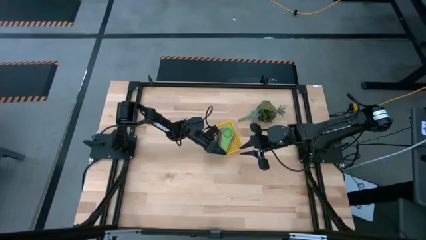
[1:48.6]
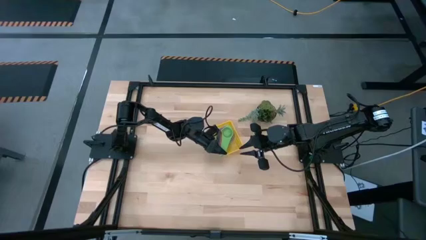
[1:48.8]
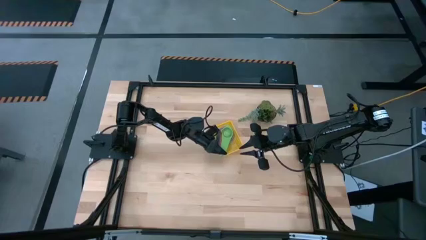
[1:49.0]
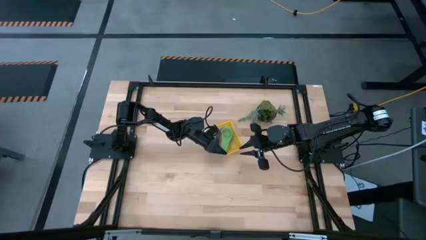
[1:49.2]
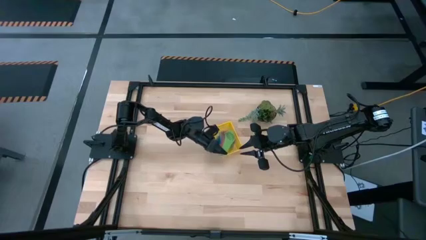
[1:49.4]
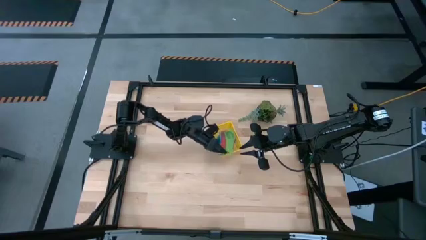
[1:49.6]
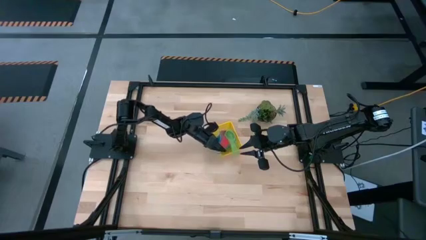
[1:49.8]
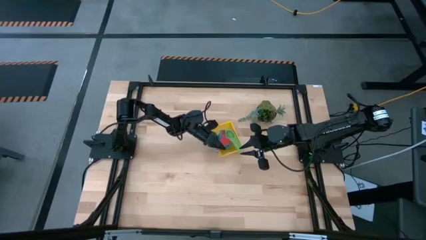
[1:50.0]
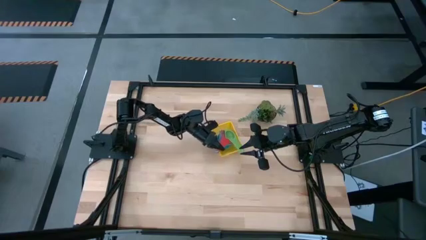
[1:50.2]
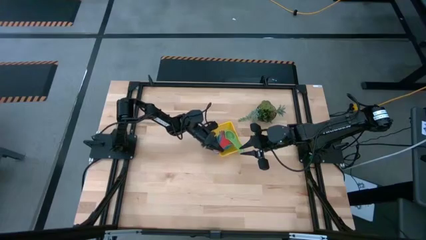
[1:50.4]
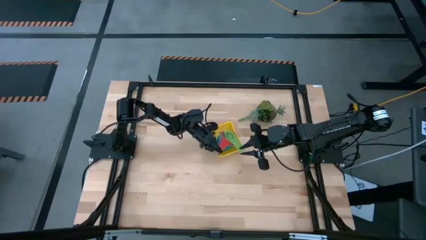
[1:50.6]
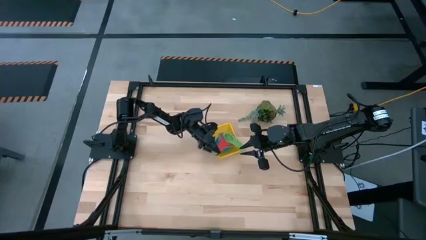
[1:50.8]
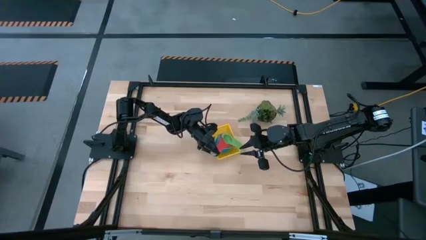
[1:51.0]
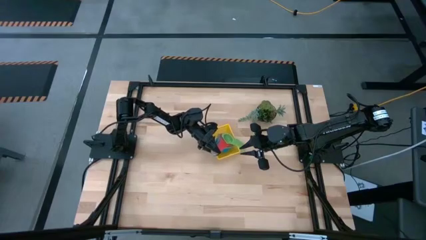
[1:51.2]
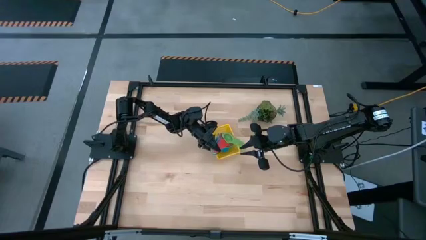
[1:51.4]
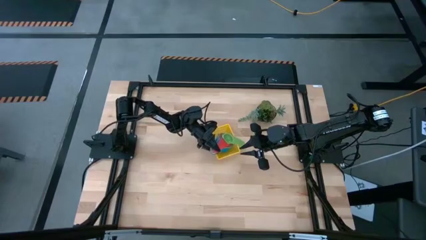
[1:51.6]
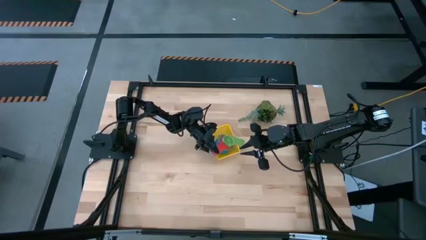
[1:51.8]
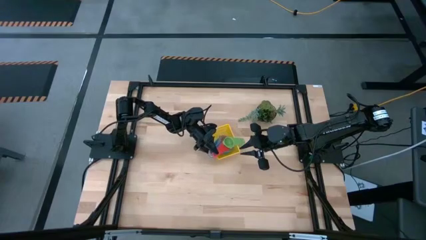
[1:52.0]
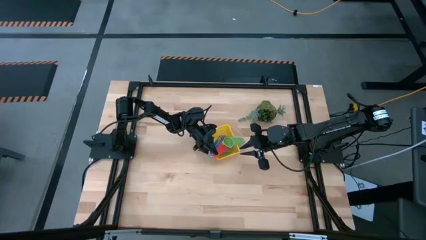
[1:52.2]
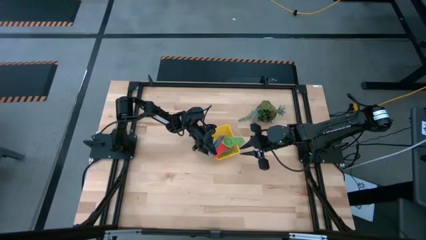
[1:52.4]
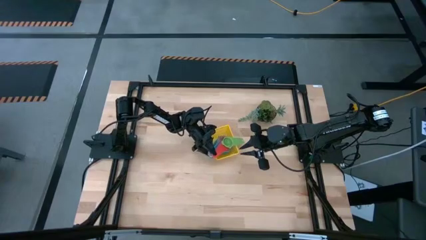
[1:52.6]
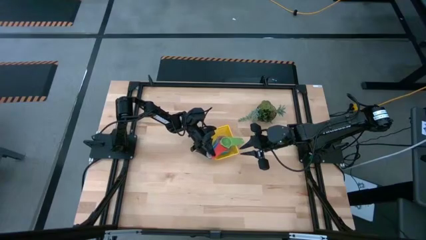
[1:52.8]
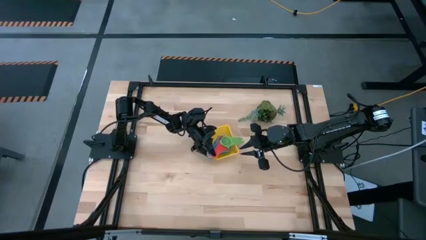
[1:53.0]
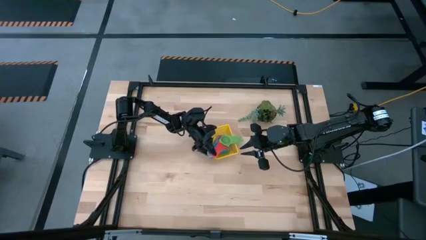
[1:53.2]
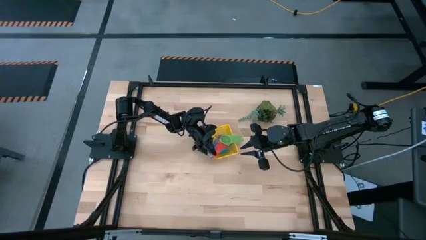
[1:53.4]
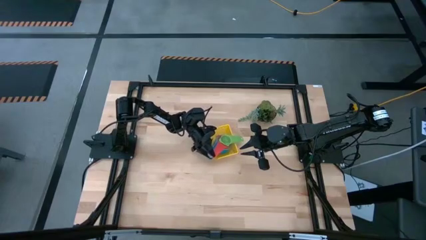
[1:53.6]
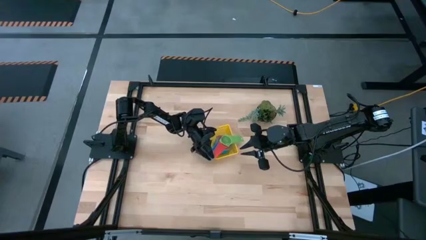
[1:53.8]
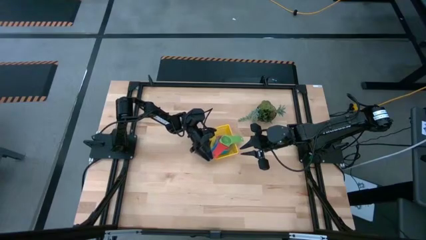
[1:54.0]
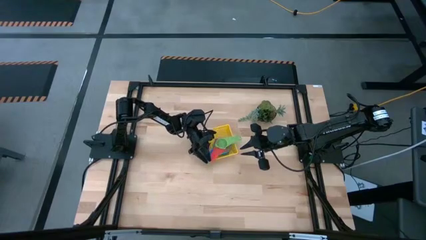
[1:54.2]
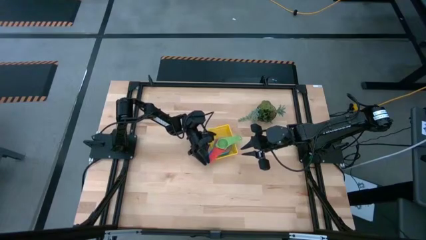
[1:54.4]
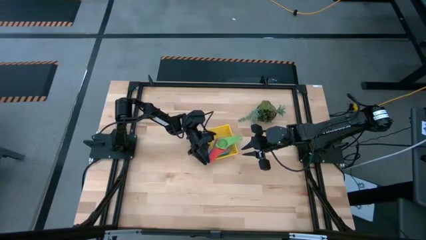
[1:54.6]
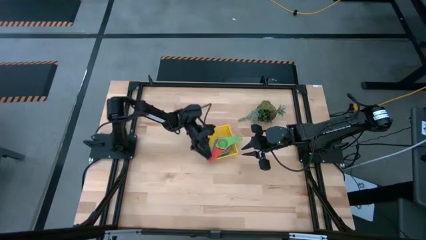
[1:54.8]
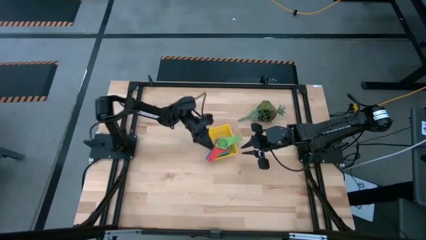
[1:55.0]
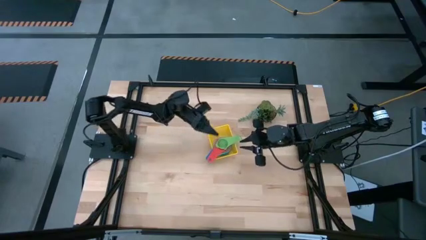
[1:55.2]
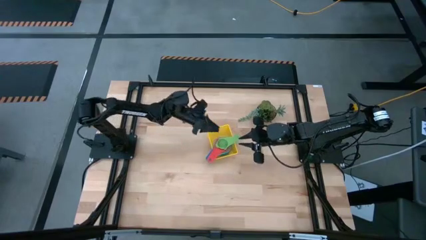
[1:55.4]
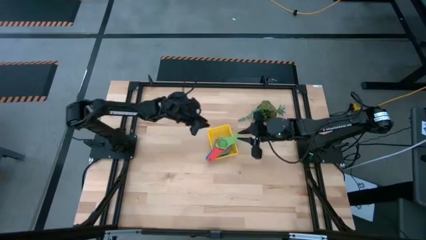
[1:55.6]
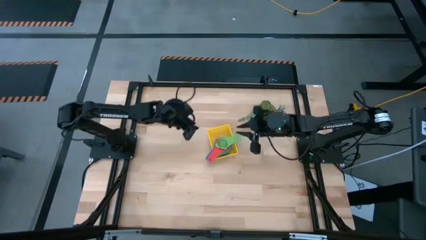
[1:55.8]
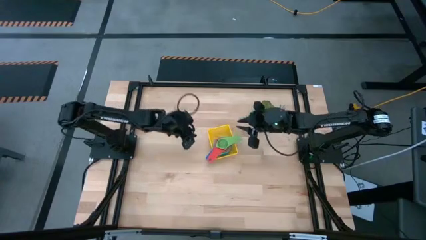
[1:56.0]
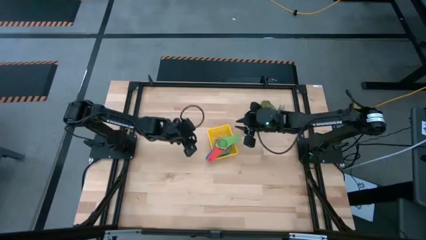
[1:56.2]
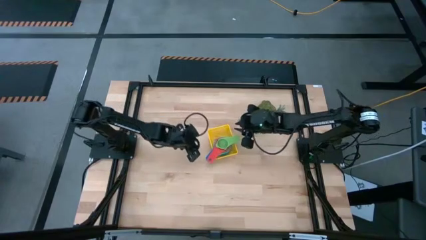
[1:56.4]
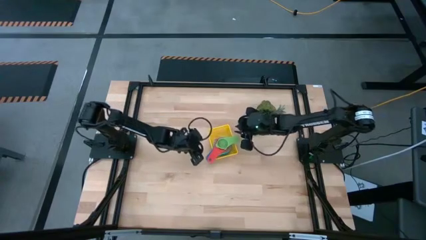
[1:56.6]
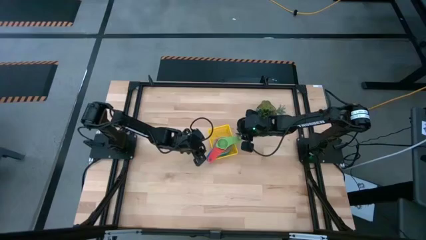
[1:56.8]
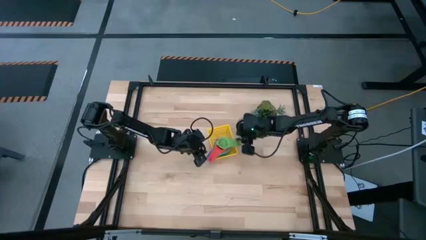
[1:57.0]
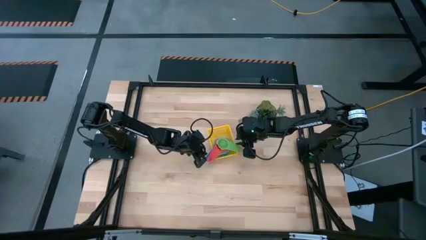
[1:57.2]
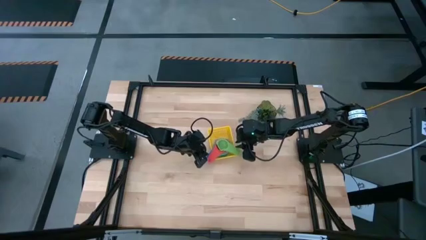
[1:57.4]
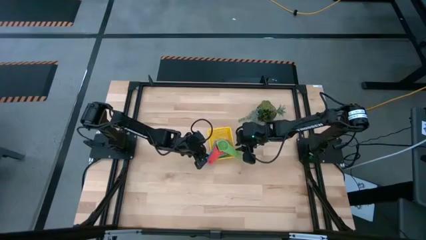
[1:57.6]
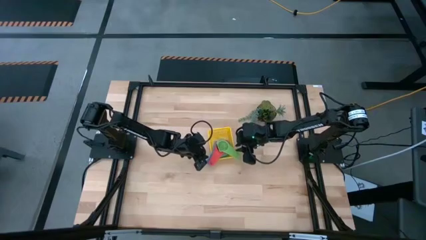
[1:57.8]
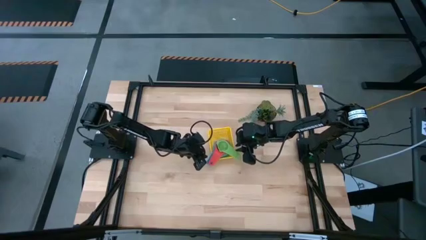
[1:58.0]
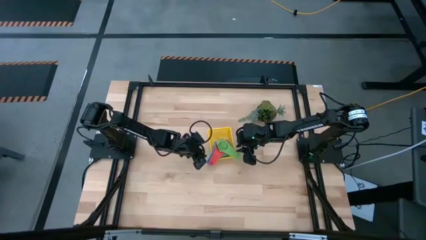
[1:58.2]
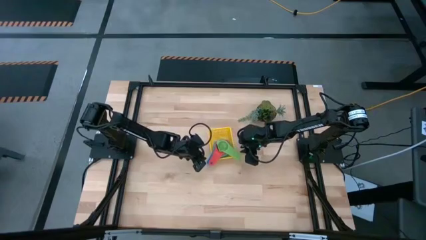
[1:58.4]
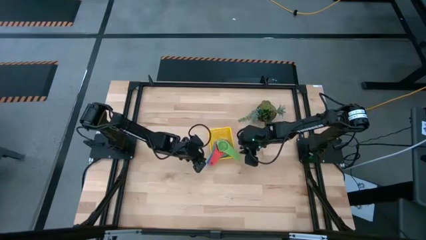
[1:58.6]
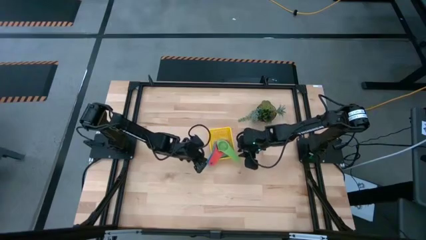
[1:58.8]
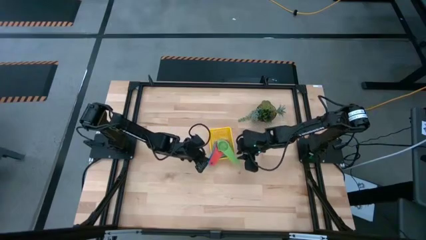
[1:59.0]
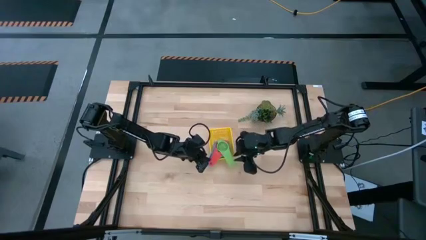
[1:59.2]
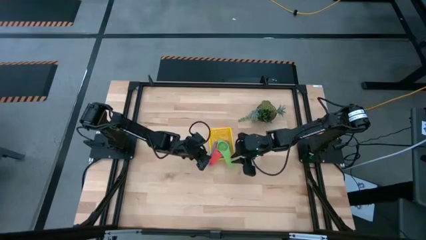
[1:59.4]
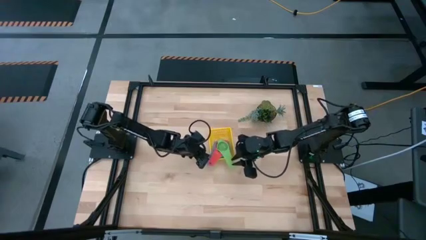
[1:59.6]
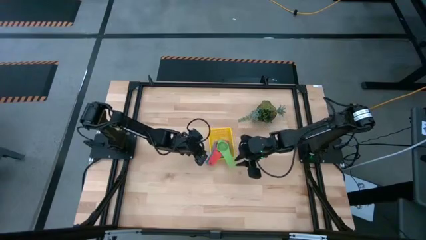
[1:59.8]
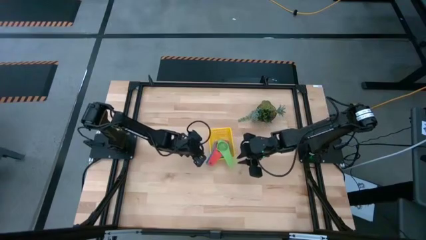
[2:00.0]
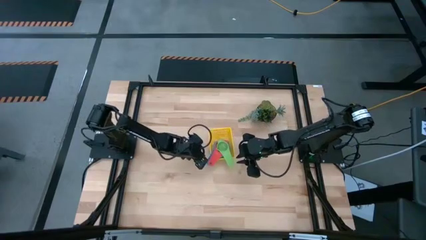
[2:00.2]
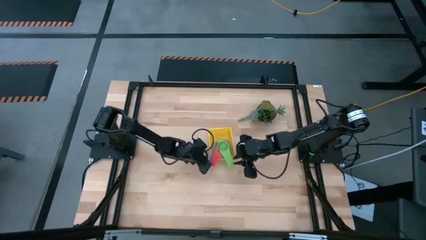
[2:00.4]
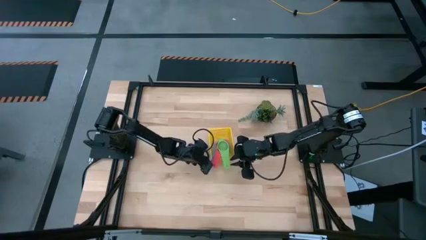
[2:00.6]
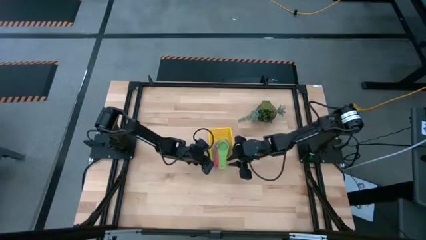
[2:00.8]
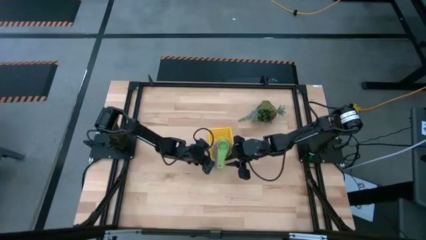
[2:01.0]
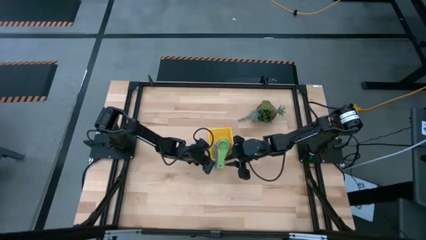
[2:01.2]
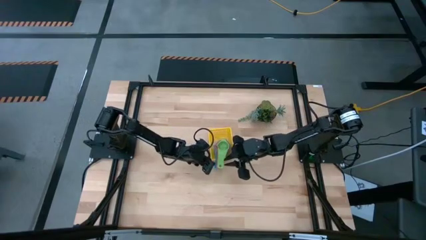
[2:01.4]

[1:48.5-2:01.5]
Task: Nest measuring cups in basket
Put the stacked measuring cups into the yellow bin

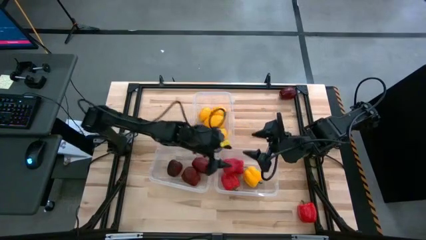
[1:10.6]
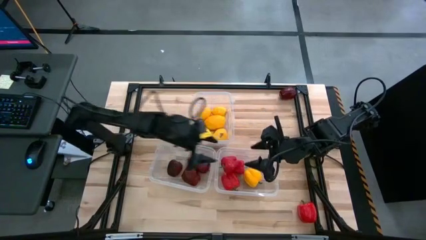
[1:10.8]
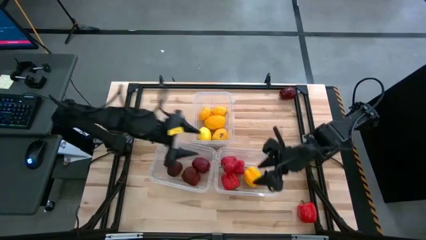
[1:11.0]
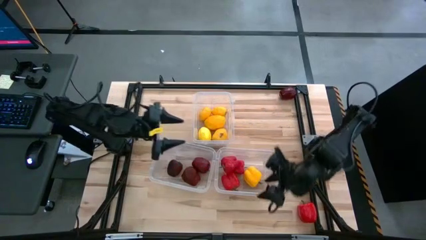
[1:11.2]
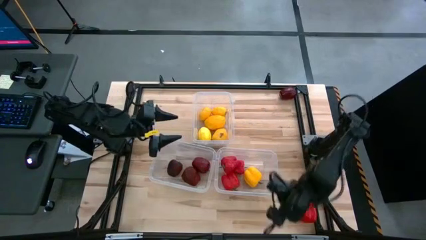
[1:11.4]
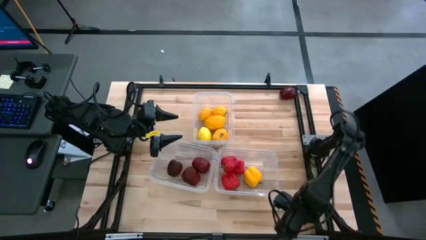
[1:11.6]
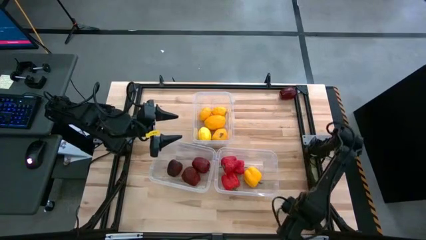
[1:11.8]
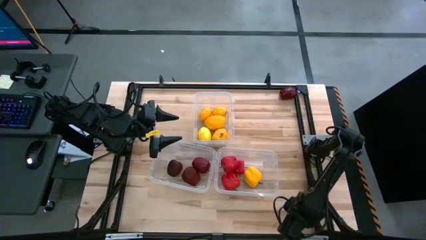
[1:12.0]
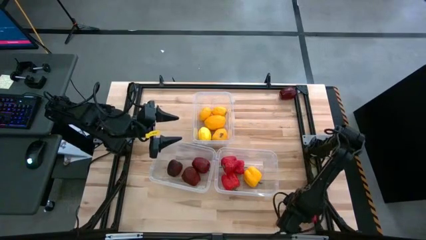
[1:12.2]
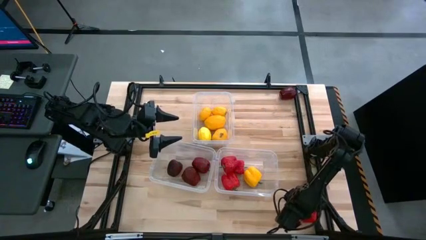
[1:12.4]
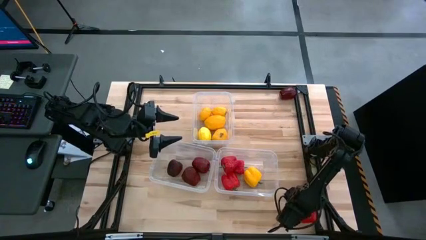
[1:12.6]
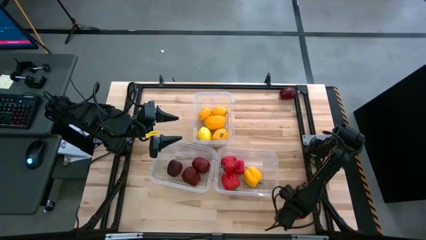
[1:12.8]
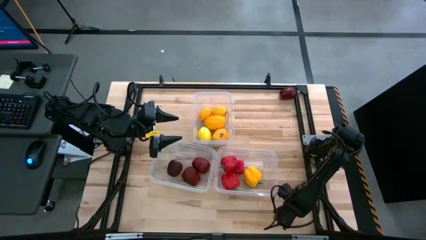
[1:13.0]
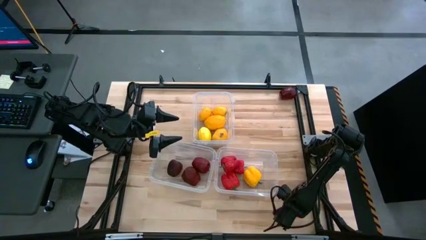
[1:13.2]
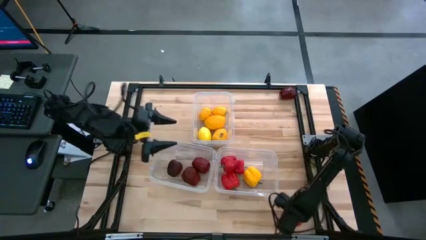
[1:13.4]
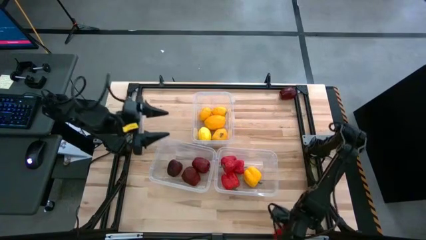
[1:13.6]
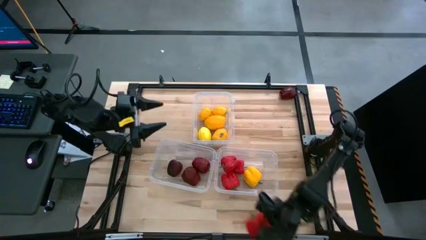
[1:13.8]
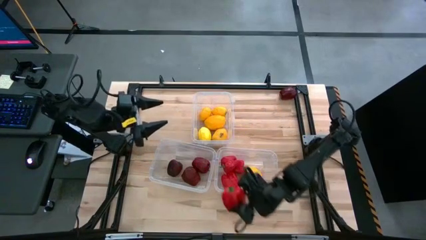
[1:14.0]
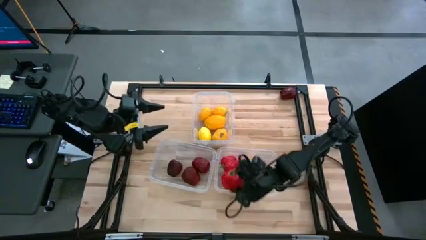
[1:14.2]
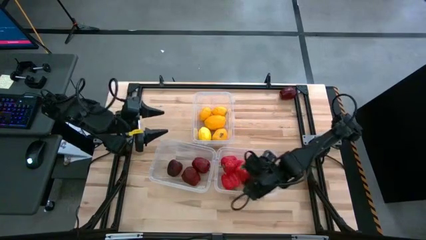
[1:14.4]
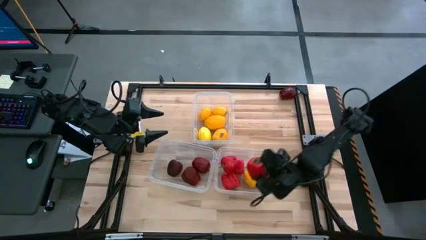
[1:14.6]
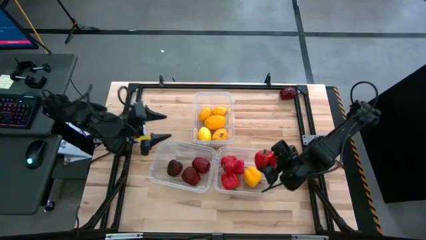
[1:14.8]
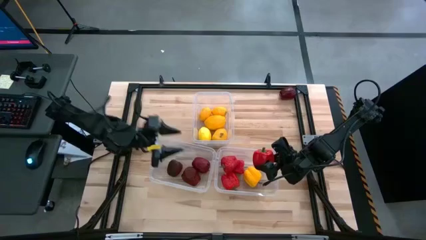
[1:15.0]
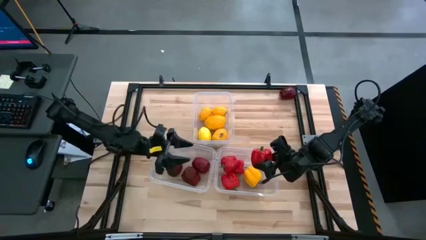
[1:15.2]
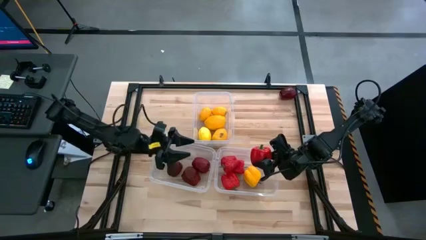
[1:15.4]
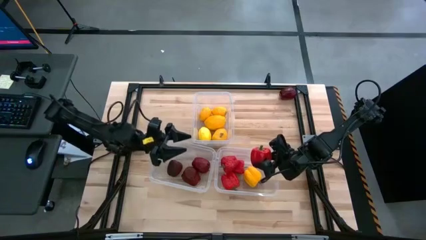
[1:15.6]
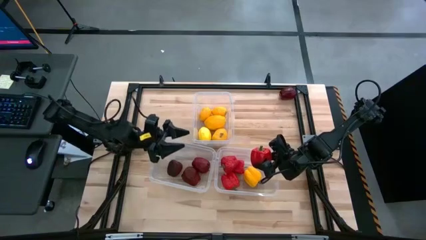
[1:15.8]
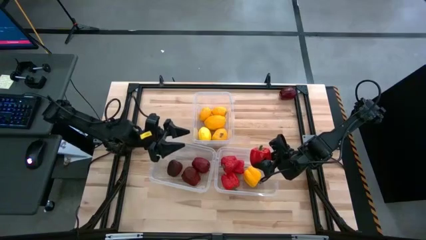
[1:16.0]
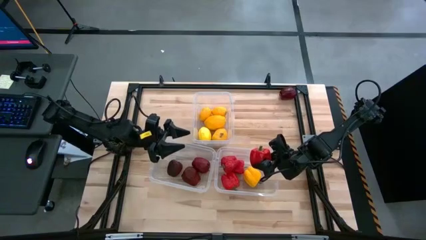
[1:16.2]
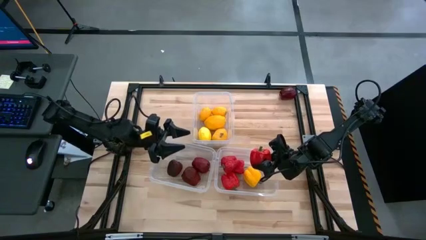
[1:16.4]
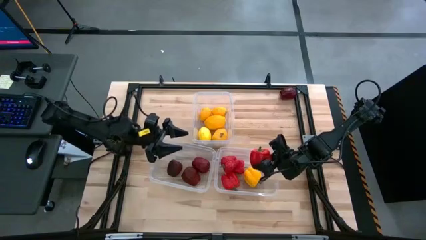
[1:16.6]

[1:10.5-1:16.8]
Task: Sort produce into baskets
Put the red bell pepper into the bottom right transparent bin
